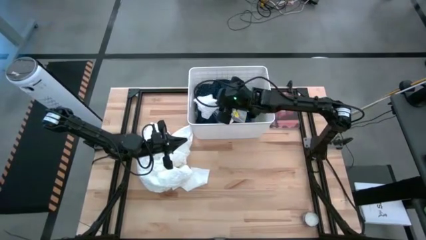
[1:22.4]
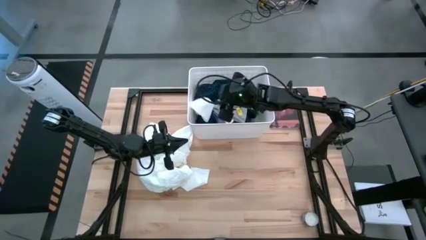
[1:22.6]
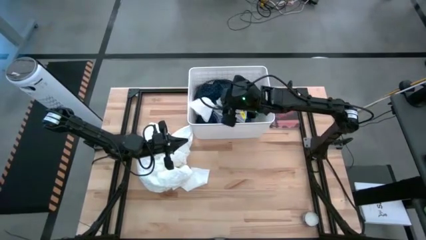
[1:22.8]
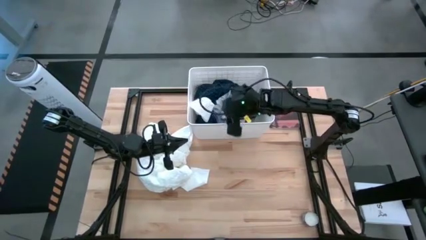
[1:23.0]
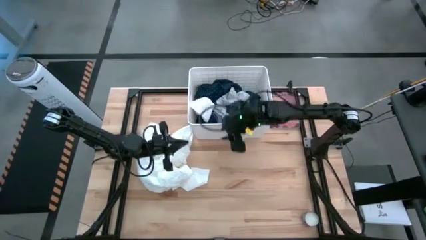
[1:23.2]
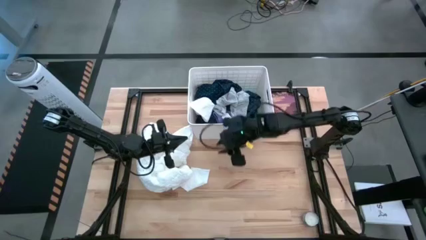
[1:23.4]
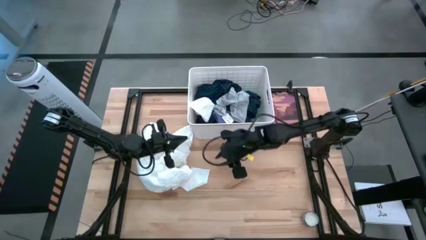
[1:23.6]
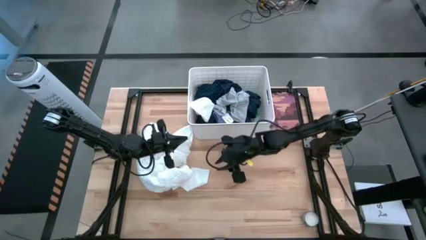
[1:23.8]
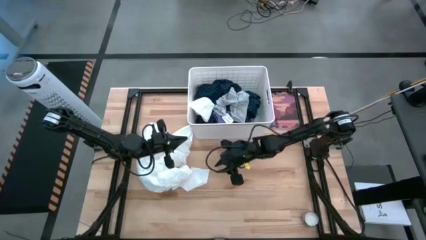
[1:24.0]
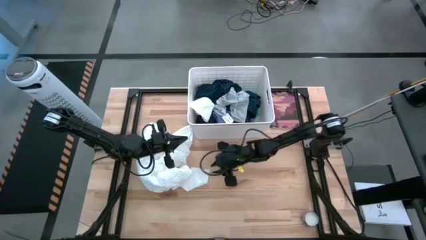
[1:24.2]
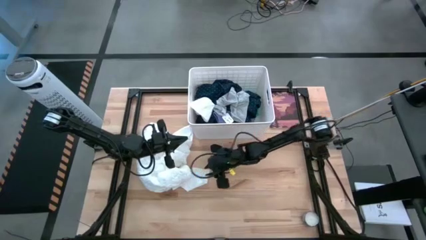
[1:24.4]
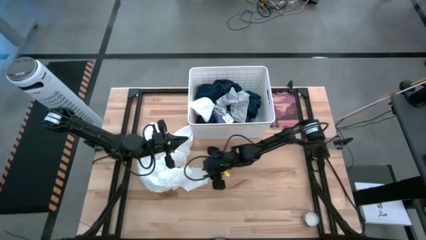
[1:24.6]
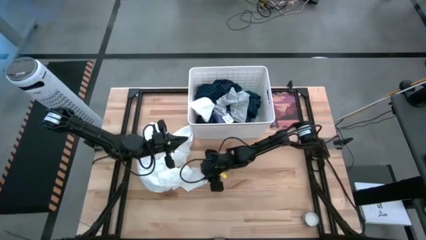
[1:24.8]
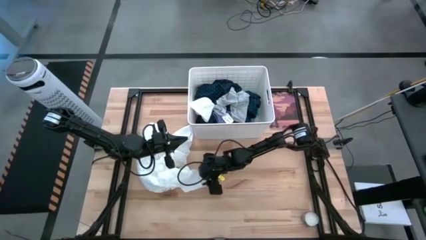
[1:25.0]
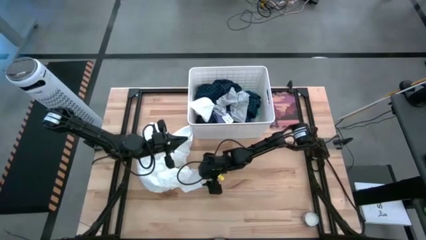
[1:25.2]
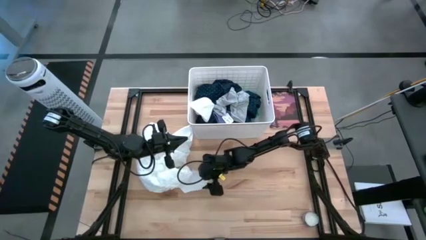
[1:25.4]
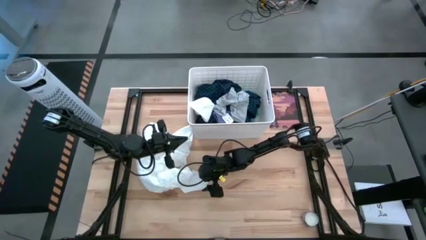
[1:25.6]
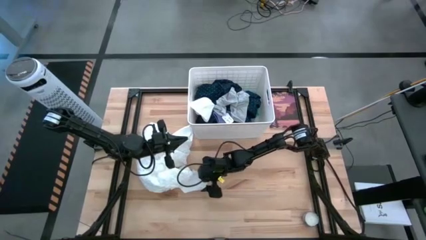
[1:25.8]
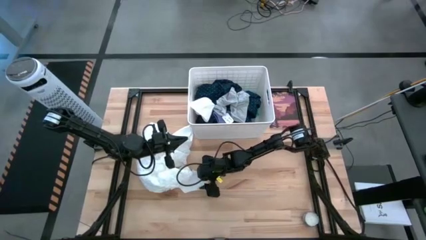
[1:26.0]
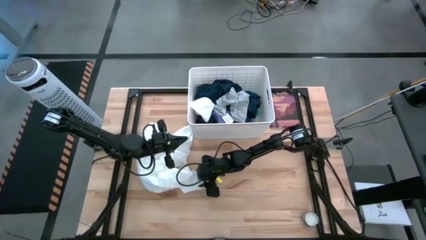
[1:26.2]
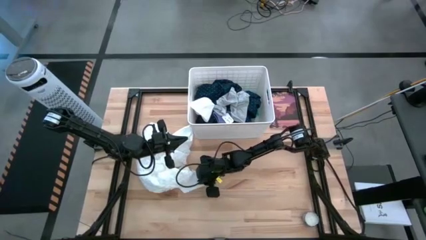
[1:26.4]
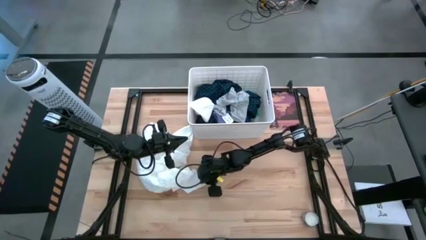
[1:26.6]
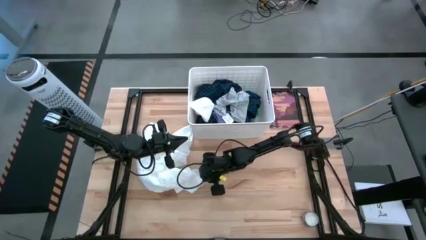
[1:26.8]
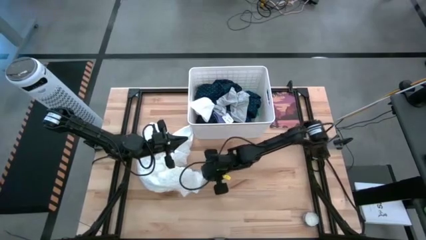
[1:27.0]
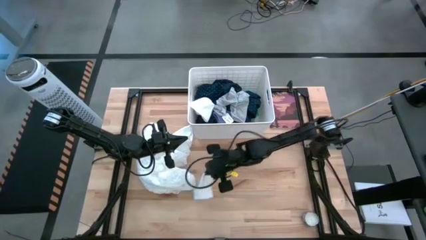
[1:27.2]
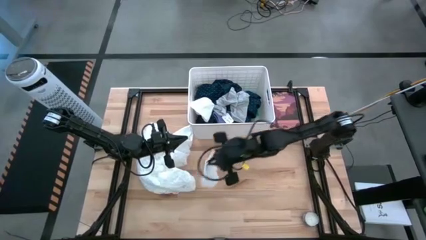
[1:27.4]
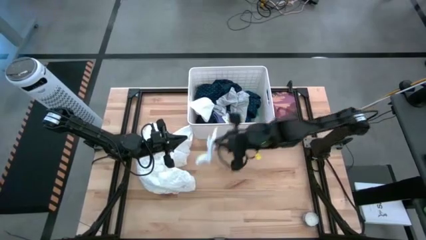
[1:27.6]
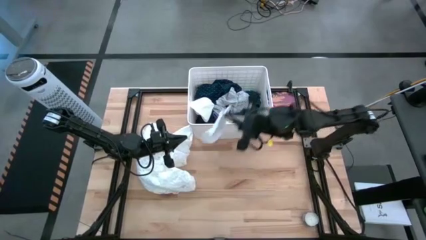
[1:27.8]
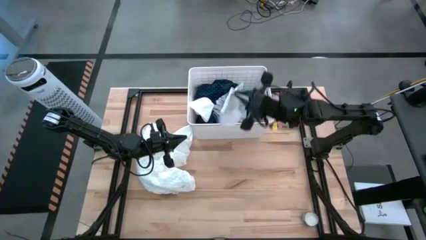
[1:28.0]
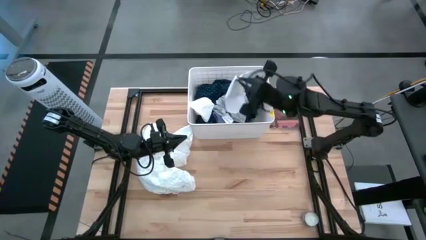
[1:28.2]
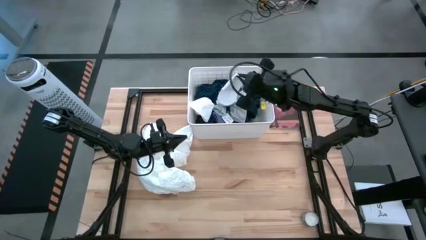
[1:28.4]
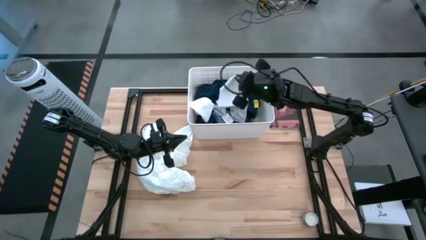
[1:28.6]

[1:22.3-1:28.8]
Task: Sort clothes
Put the white sock into the laundry bin

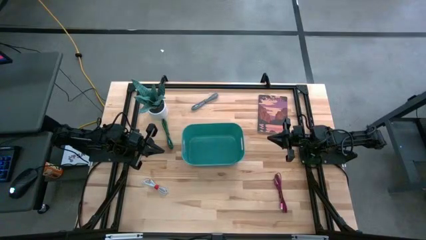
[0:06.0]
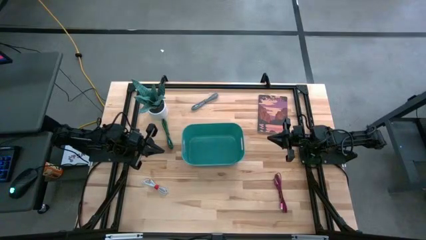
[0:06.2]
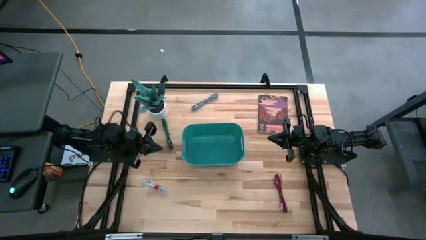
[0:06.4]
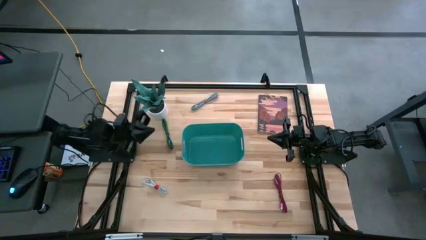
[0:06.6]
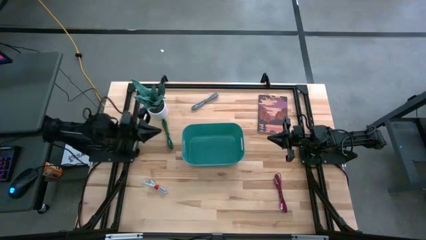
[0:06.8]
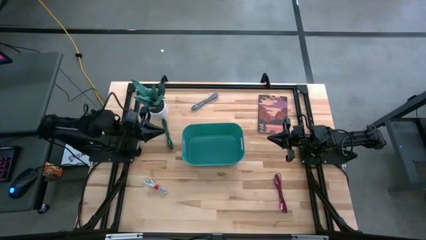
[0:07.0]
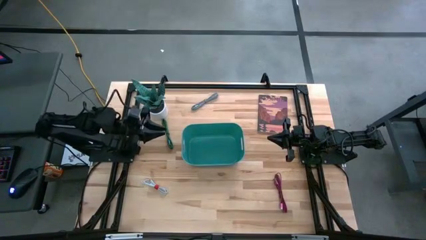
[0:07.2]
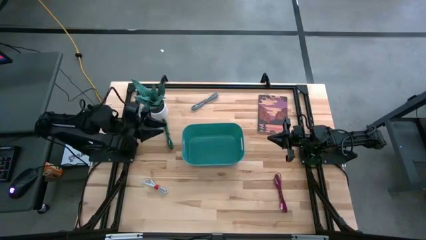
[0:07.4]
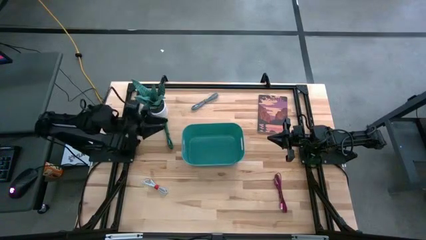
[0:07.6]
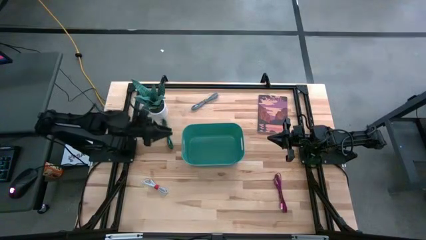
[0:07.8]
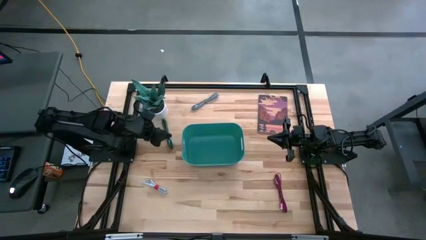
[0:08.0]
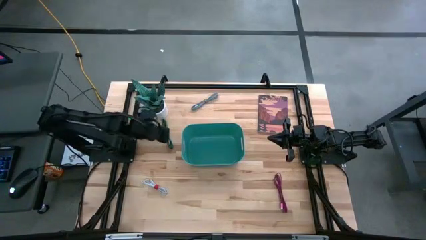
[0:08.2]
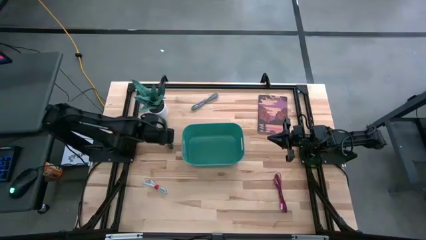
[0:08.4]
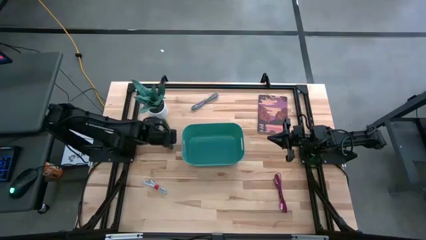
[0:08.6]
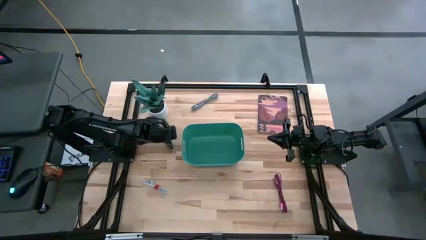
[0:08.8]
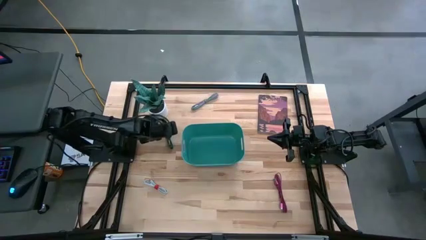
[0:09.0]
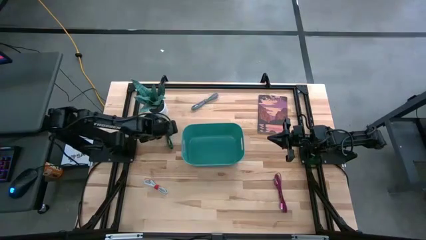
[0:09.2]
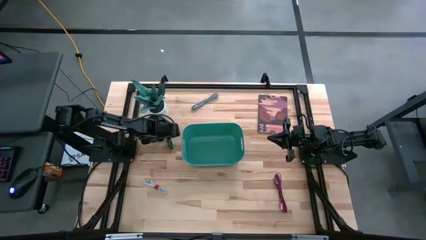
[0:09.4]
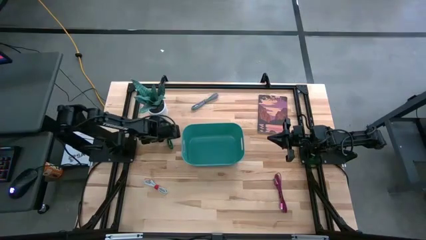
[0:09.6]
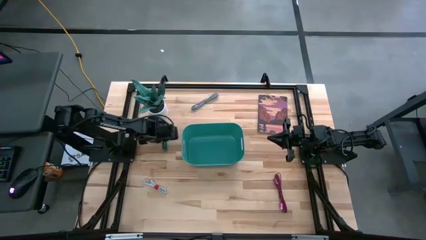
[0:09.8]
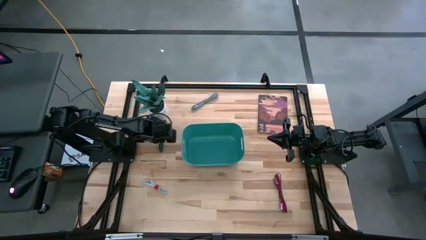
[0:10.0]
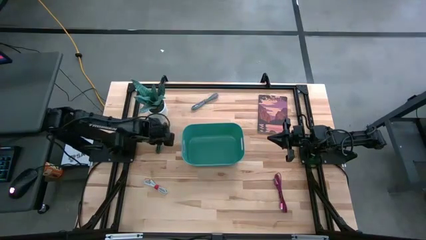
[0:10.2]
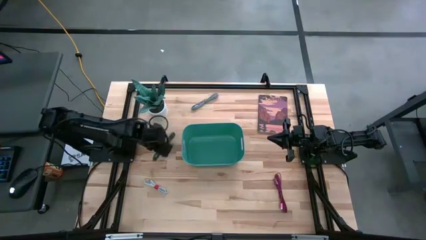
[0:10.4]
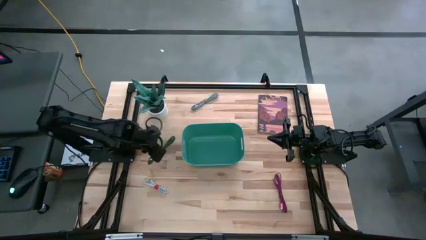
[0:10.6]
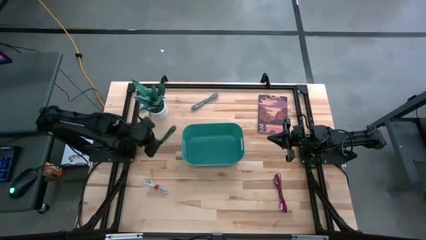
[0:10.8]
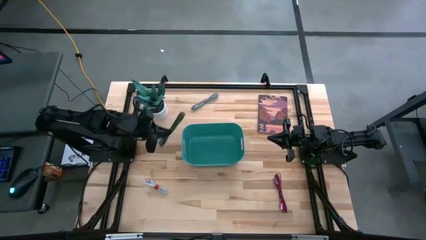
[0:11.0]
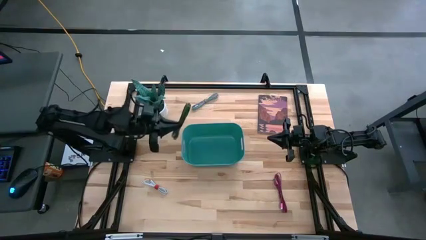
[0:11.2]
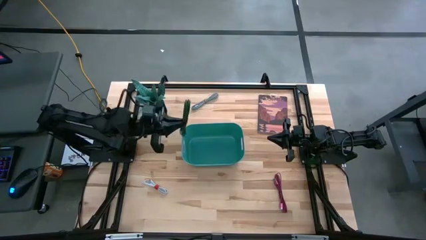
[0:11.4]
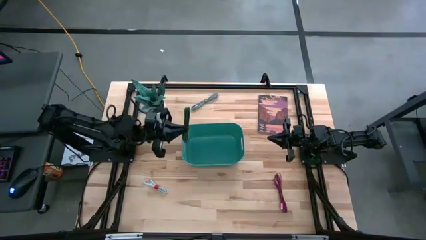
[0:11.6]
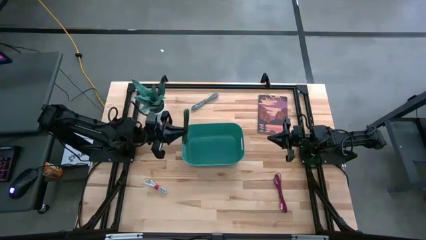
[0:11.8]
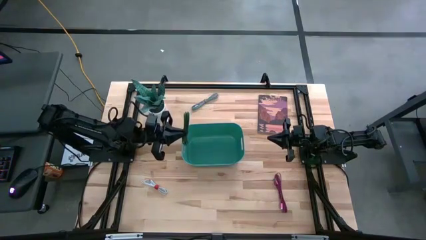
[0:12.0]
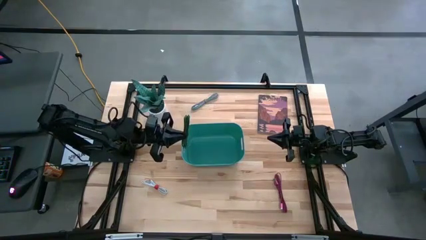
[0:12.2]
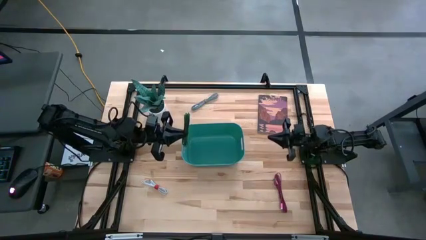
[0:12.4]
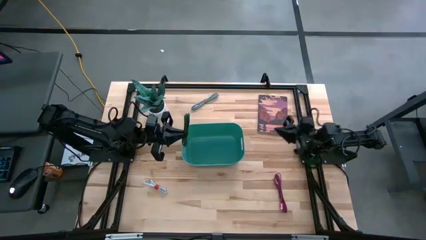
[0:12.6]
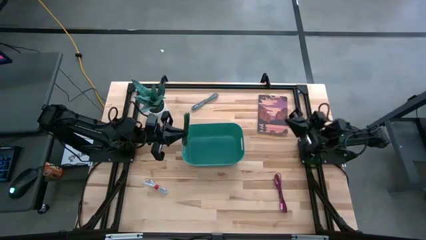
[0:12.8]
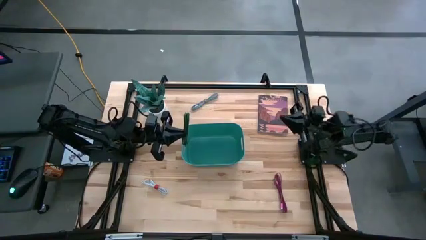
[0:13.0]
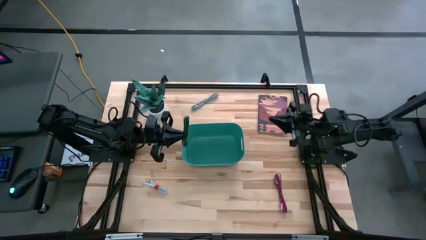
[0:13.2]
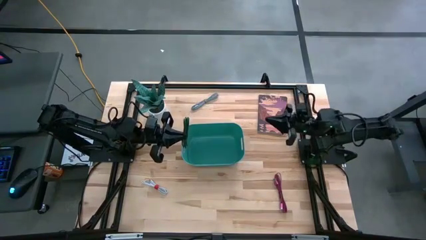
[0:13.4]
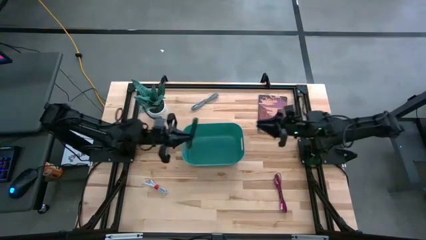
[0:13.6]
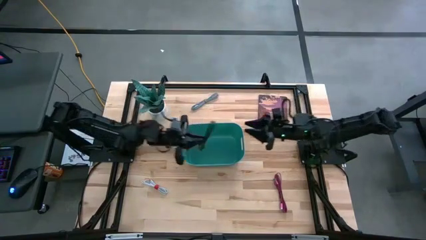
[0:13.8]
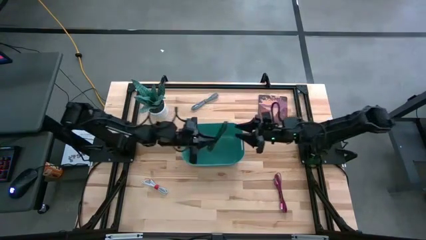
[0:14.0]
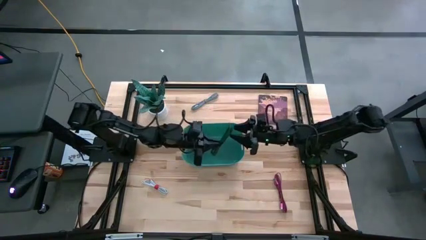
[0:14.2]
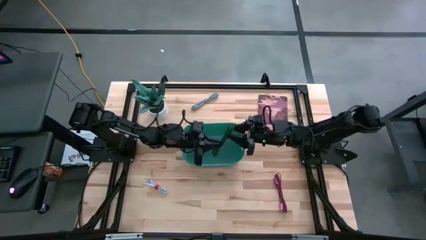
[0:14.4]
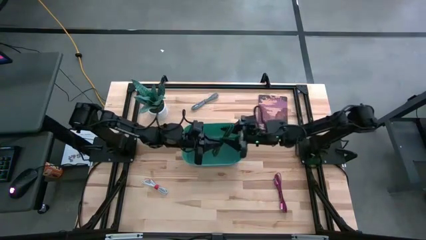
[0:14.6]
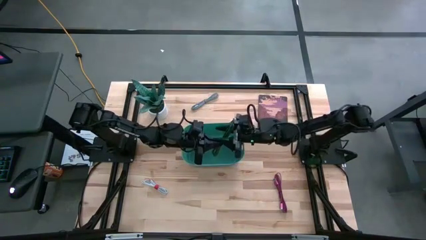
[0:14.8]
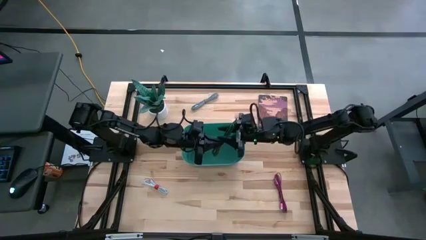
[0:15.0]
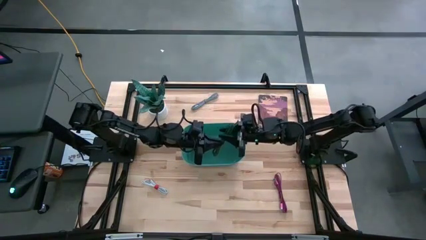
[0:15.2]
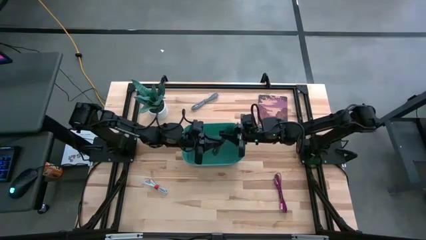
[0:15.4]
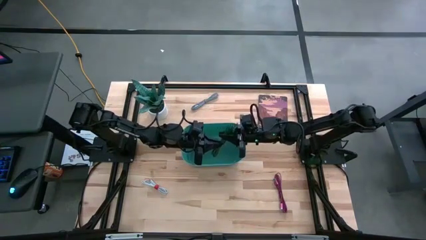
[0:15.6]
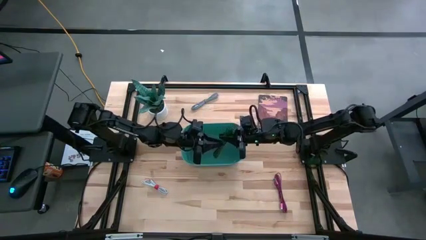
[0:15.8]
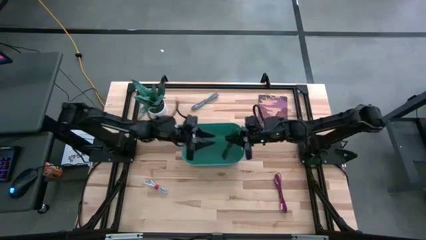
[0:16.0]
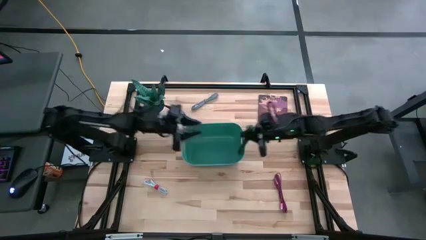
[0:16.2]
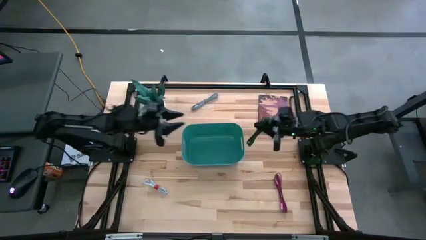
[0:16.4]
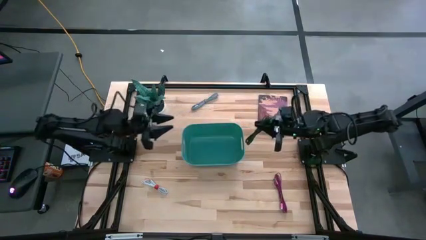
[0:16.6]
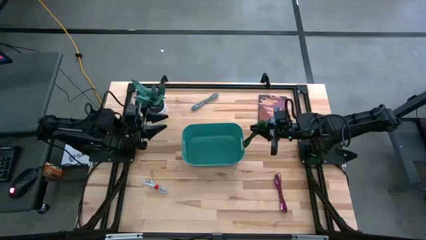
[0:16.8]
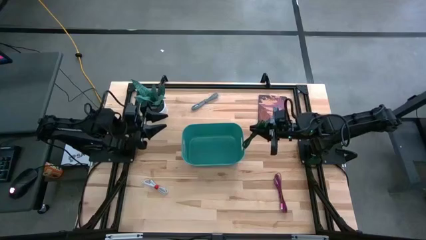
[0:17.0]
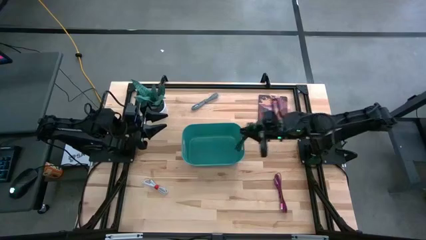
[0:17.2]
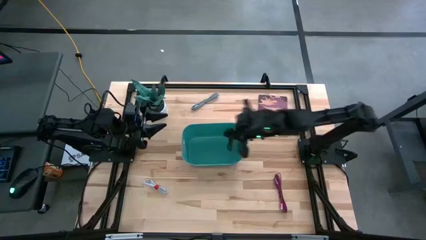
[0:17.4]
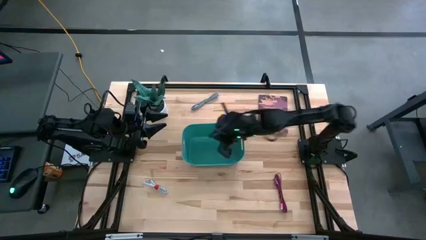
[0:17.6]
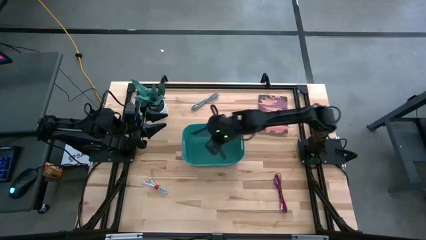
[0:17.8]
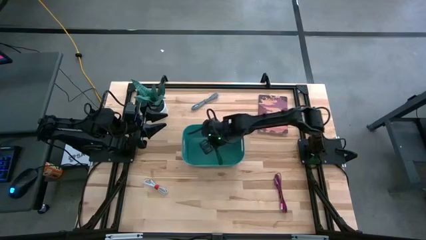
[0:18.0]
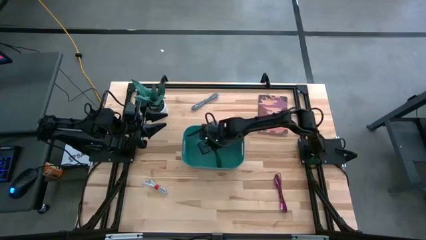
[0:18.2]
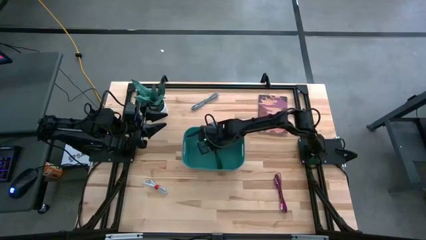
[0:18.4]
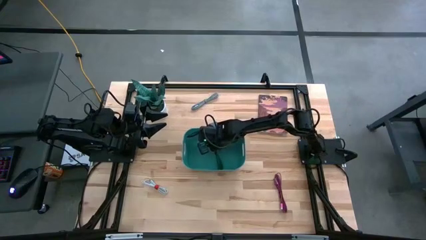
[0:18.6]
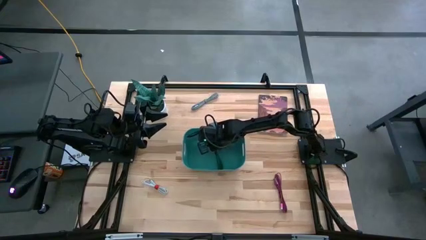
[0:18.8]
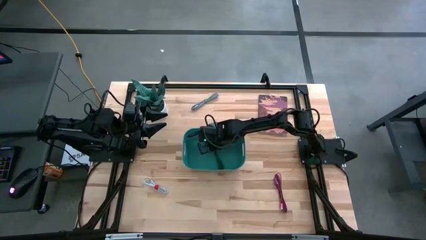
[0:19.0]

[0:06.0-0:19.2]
Task: Pick and place USB-C Cables
Put the green charger cable into the green bin
